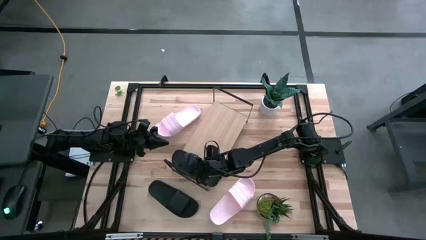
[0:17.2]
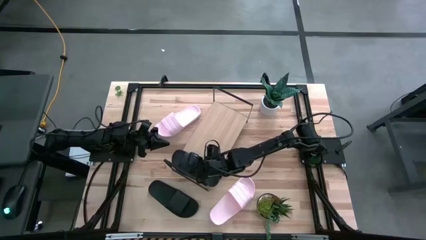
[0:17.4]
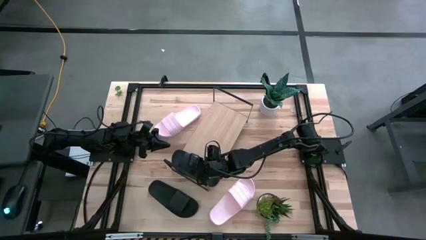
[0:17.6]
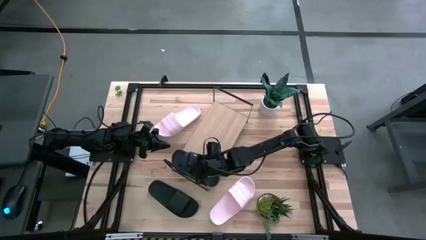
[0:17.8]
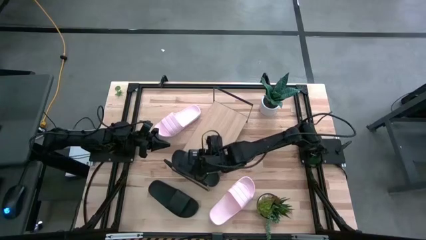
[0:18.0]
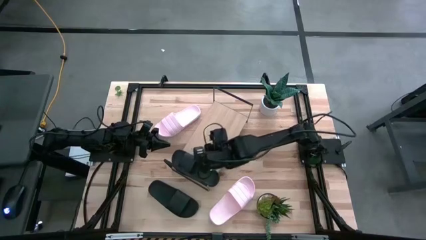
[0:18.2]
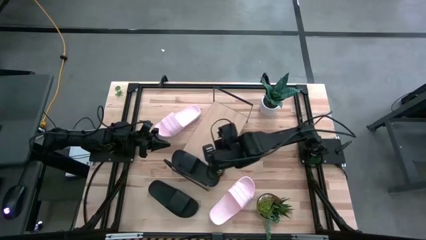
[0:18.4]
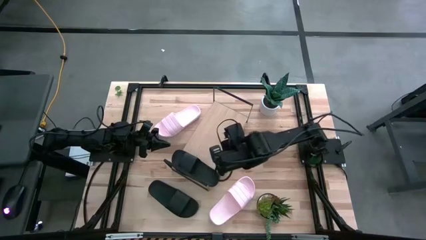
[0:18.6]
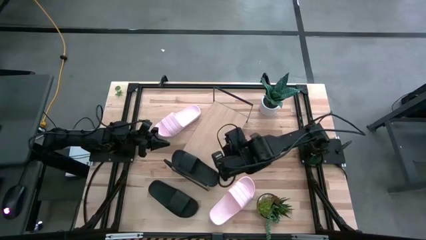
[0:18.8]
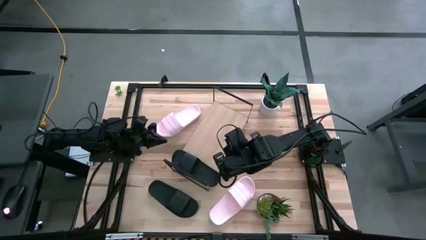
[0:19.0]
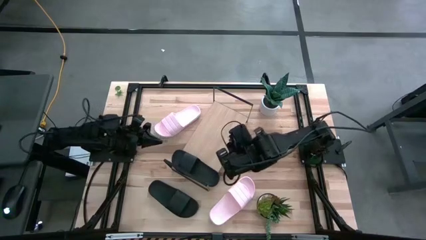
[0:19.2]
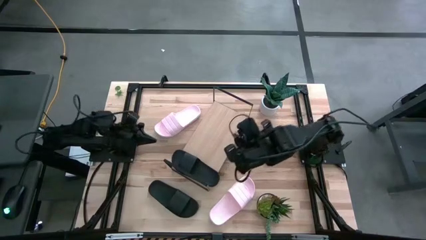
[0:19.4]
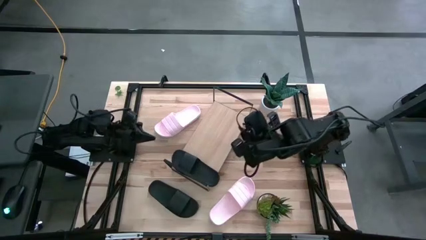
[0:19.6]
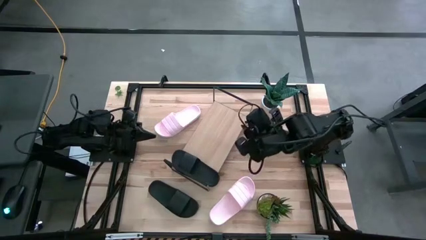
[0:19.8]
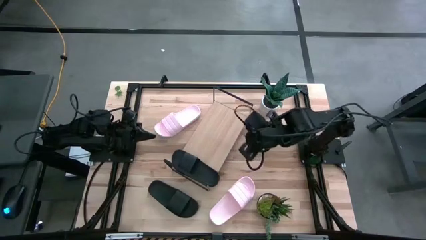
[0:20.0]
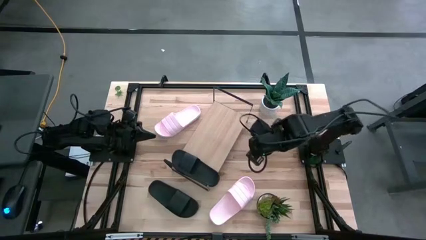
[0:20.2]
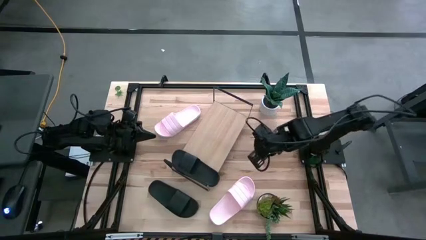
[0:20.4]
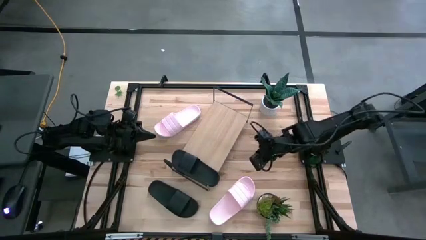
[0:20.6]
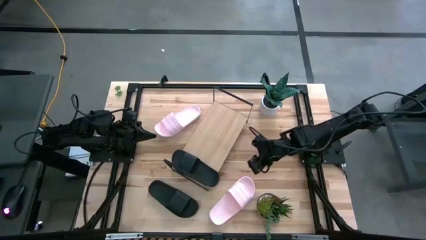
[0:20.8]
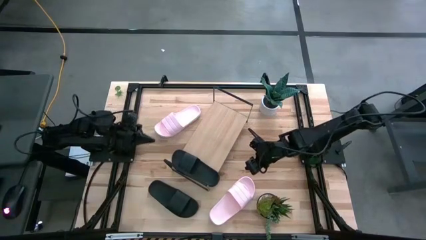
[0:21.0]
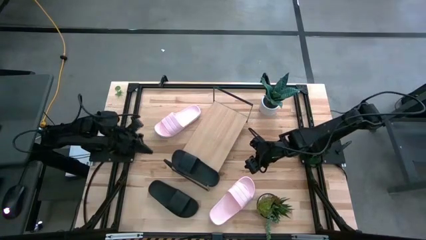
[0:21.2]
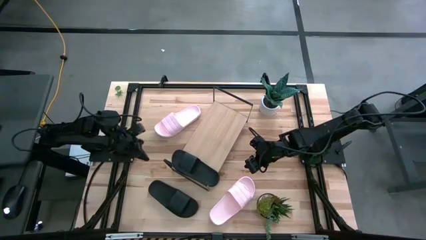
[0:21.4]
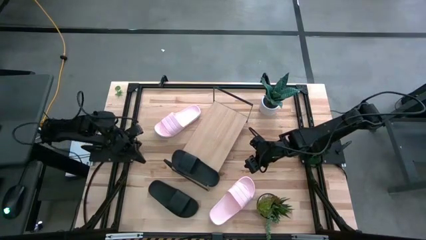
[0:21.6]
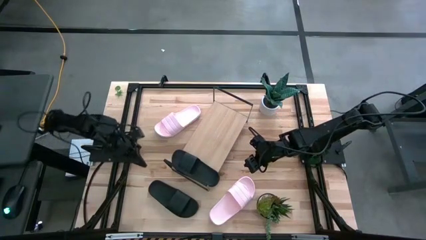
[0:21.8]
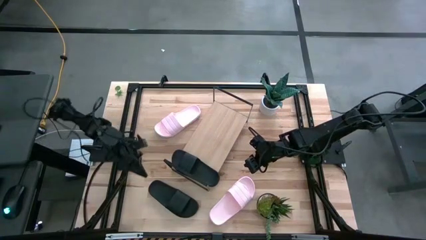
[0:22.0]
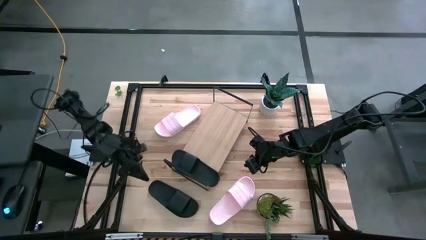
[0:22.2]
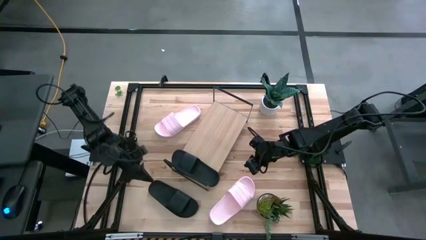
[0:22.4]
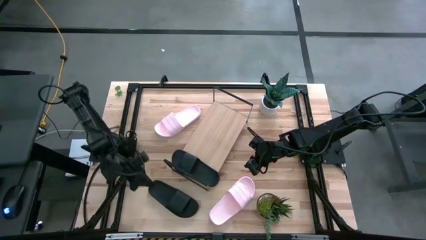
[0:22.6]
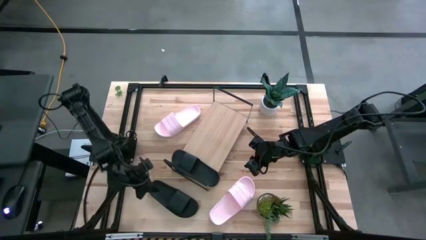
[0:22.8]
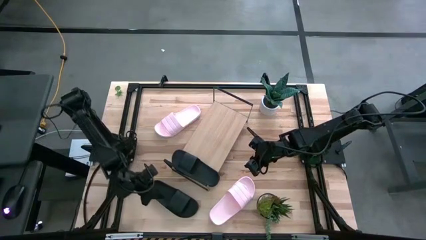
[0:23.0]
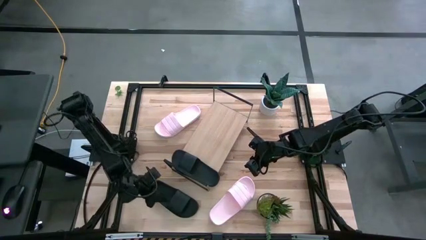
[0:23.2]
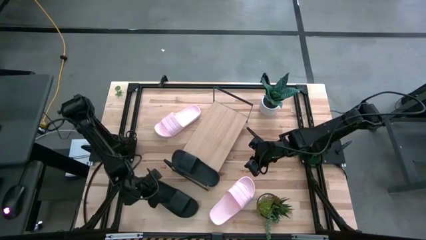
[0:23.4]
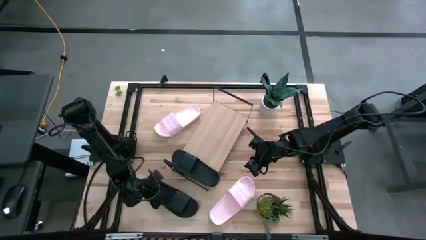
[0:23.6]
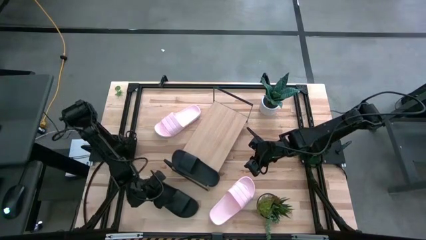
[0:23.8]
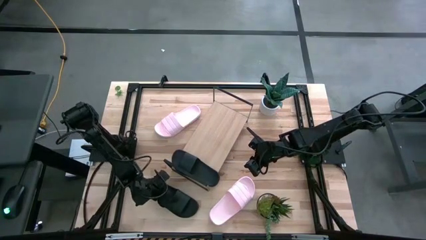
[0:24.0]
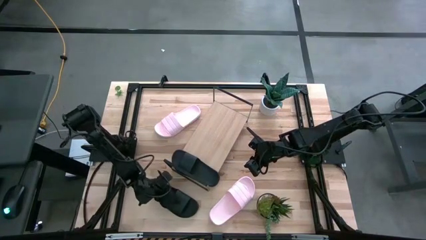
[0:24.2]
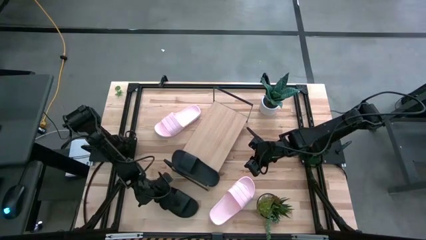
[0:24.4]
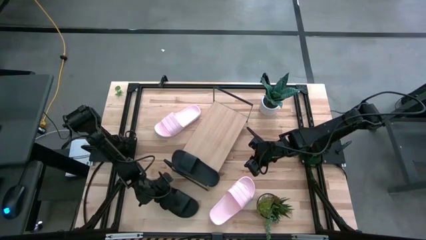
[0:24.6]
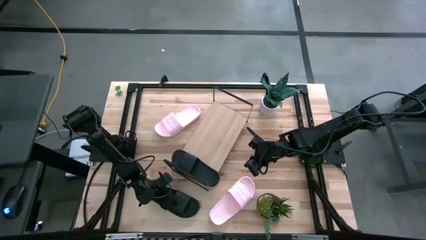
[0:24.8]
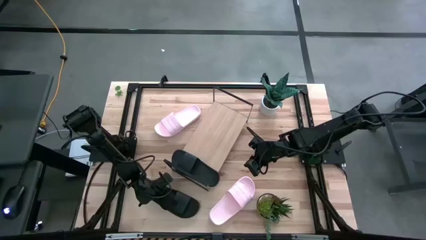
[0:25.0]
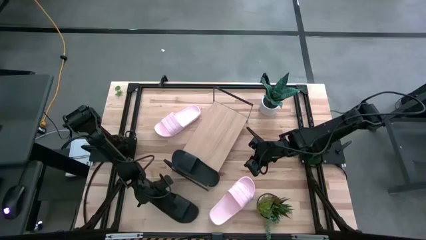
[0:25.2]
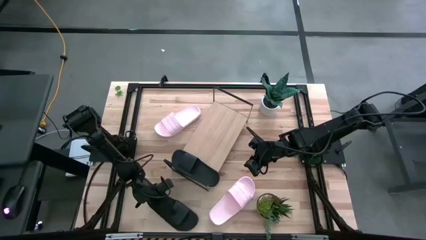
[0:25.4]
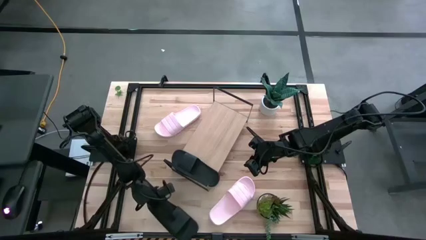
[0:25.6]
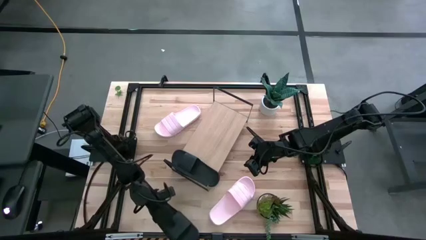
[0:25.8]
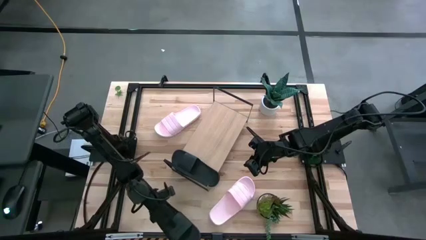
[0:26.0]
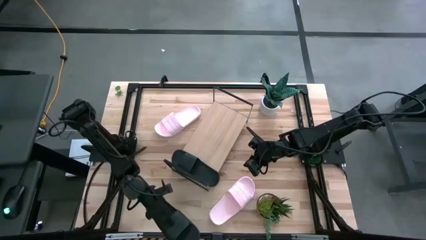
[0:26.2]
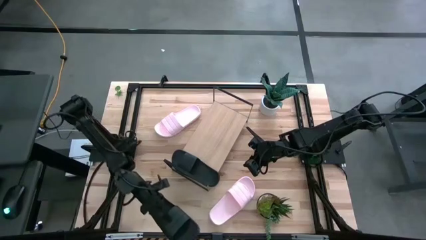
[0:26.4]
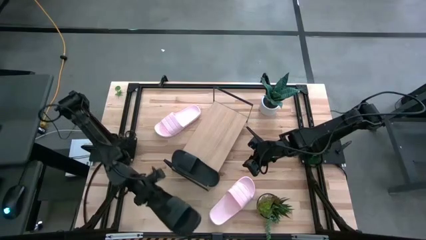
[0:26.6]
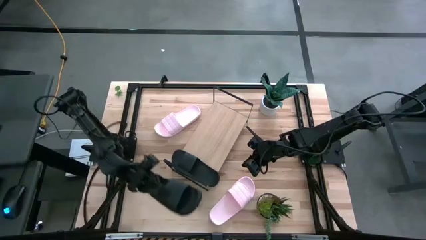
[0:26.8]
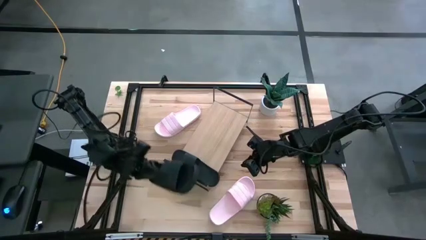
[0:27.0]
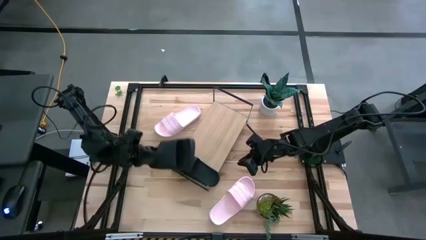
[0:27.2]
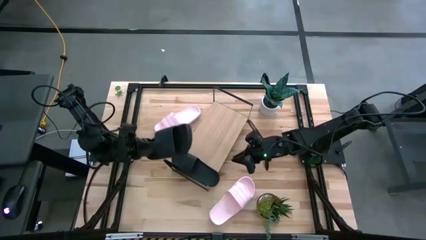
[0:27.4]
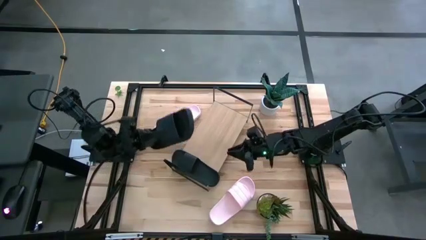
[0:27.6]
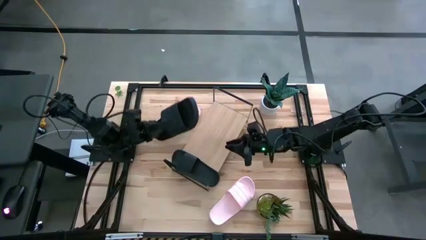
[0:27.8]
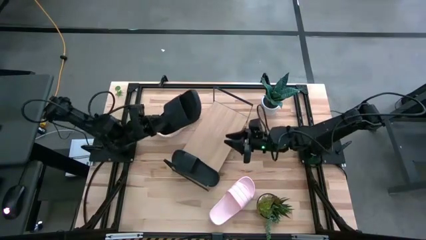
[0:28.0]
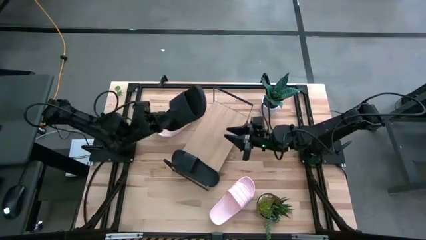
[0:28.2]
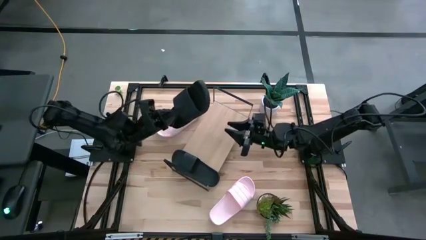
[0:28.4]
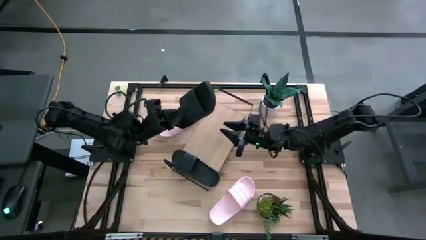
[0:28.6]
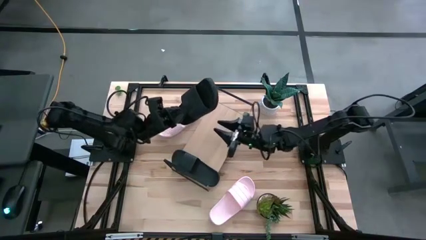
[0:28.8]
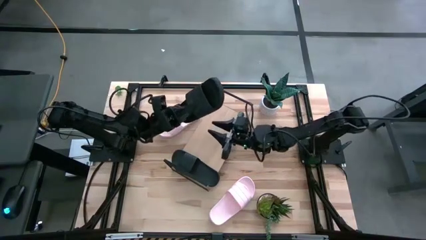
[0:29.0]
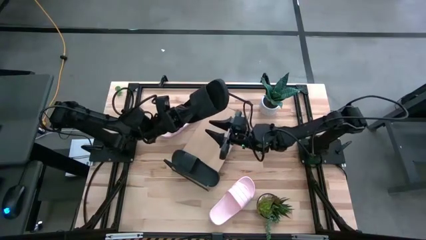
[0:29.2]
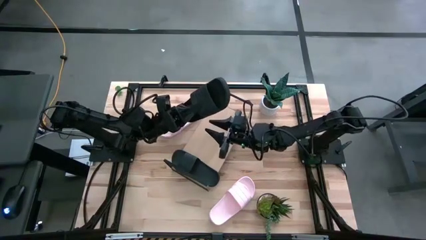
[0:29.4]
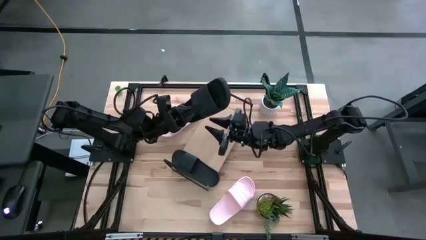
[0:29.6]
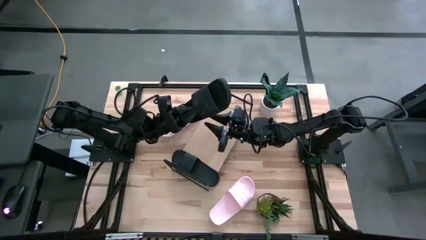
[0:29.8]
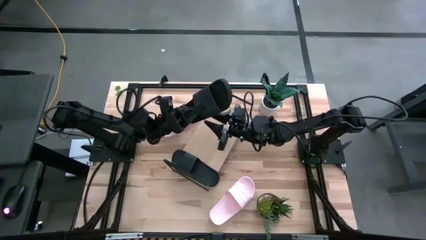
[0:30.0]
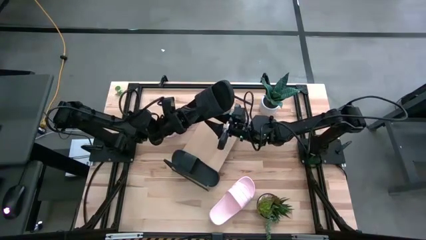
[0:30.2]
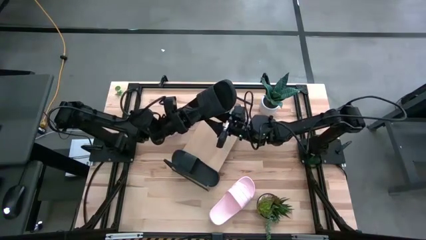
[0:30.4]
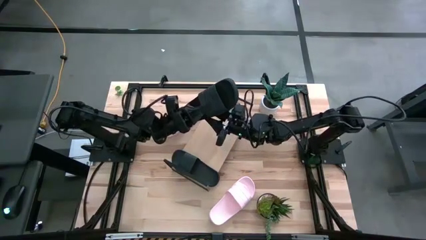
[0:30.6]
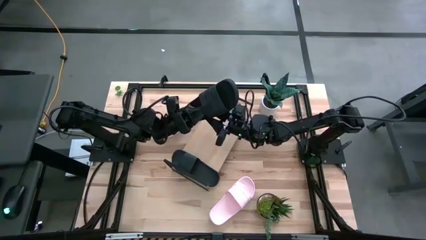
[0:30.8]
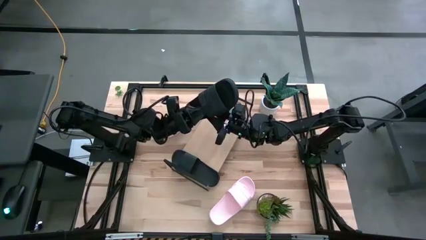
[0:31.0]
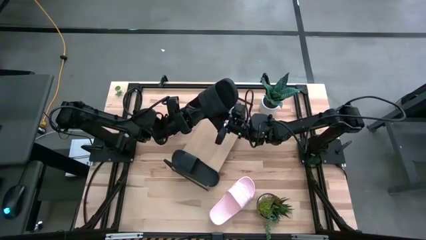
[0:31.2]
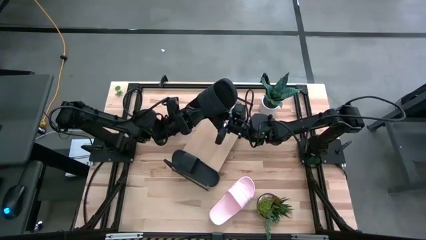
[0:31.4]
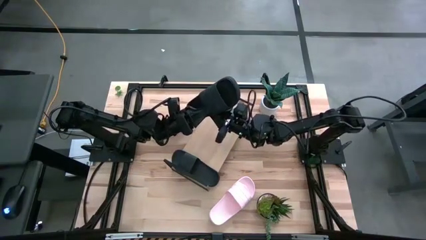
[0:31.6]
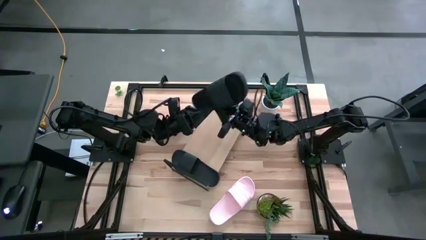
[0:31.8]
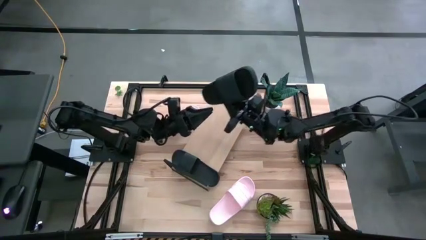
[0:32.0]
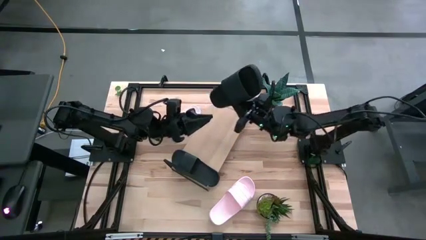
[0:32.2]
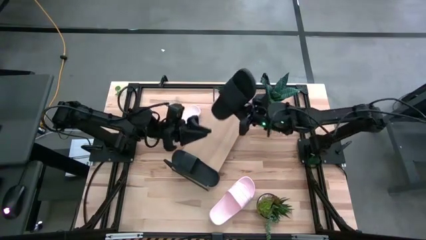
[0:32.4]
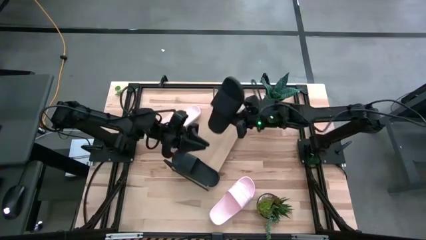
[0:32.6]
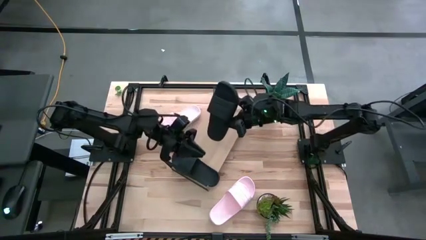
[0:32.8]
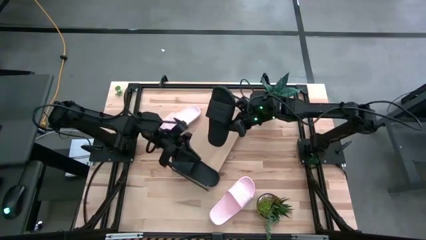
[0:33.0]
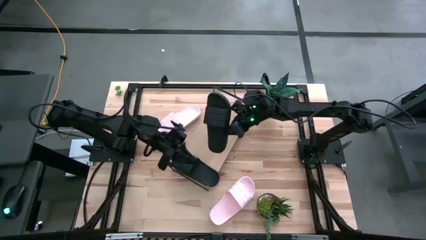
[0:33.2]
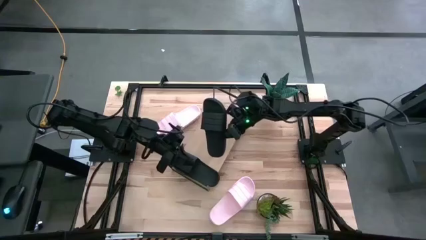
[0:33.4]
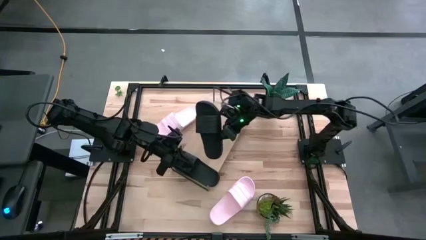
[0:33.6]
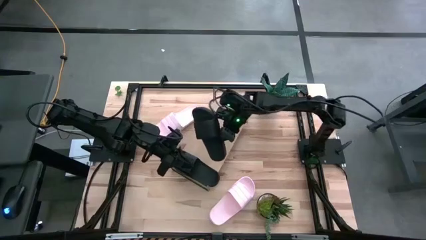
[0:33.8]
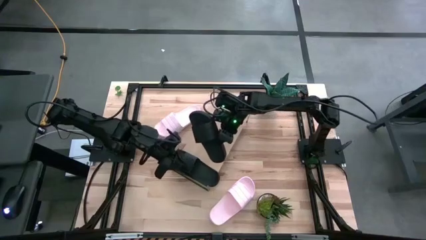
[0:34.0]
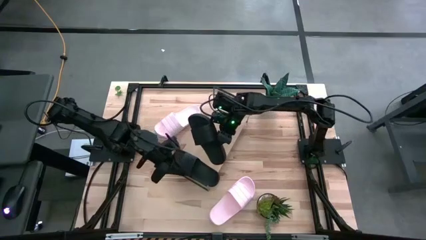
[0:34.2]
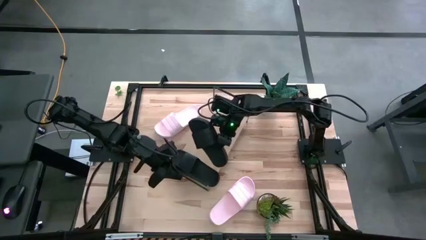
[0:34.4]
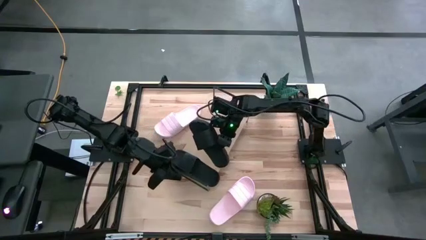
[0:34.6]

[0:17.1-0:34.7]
Task: Pick and place slides into the shelf
Put the black slipper on the shelf
